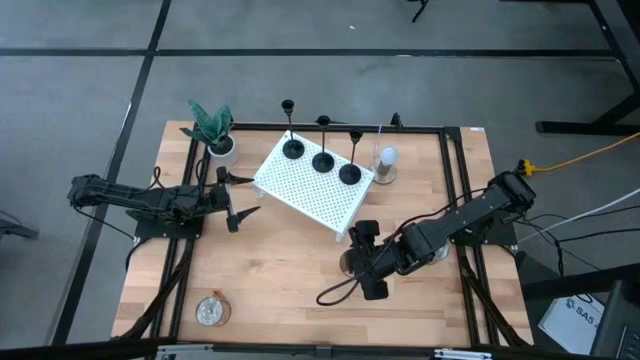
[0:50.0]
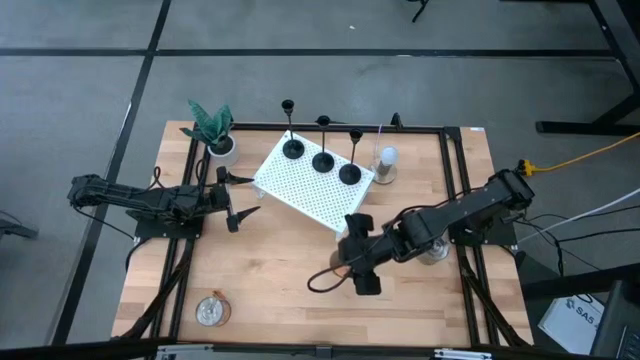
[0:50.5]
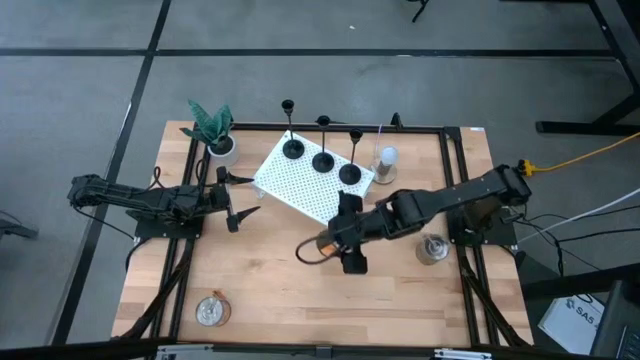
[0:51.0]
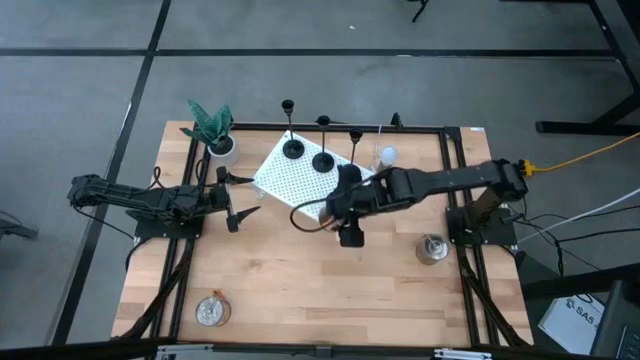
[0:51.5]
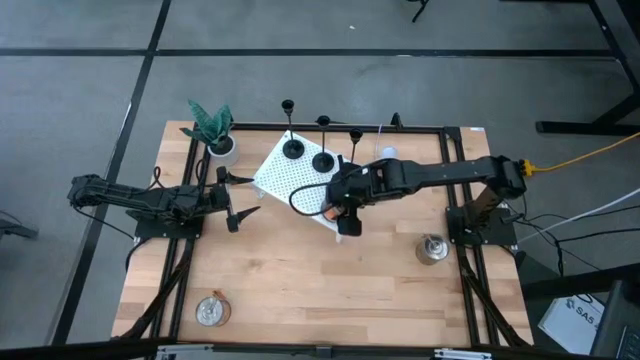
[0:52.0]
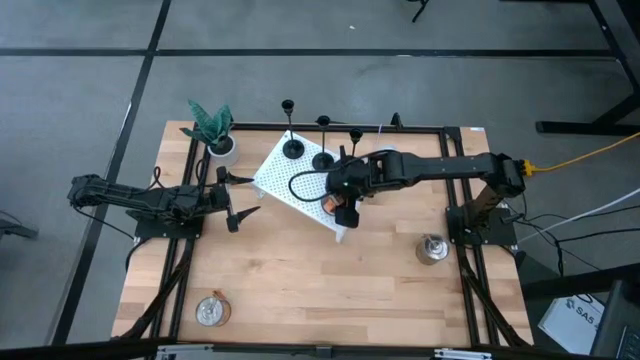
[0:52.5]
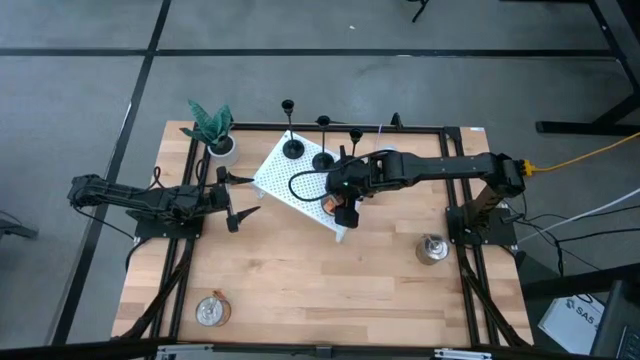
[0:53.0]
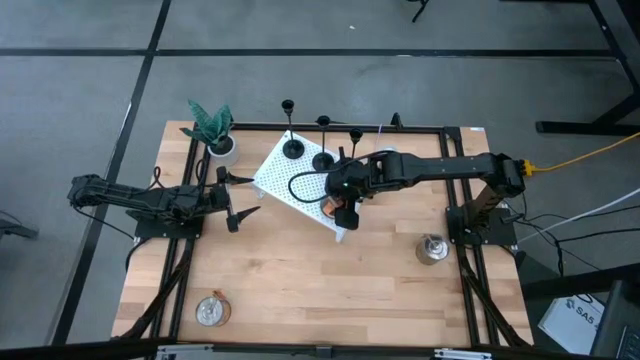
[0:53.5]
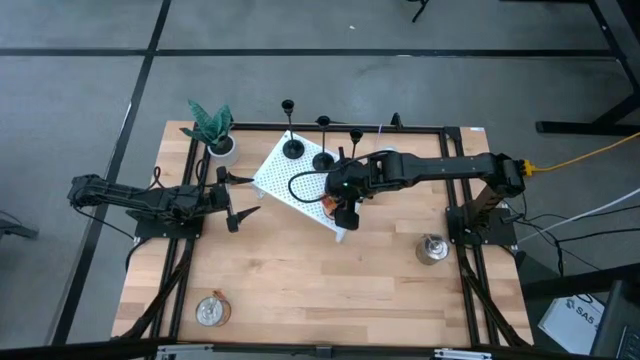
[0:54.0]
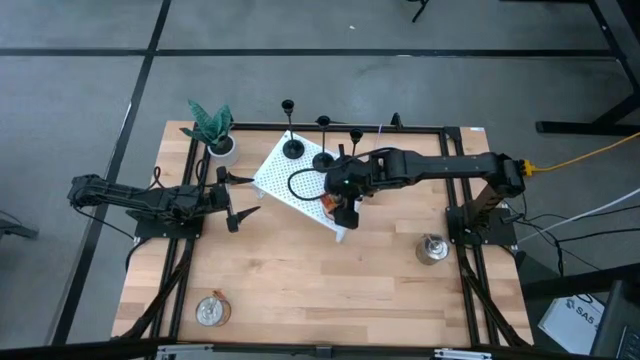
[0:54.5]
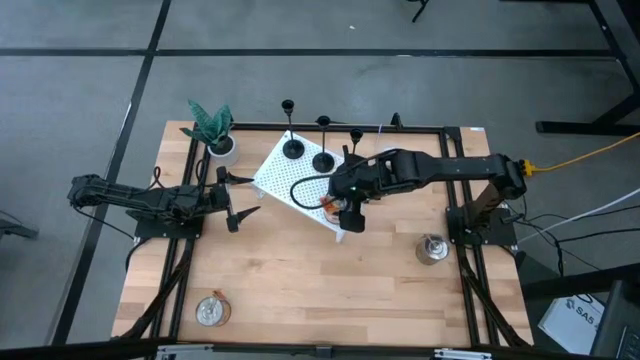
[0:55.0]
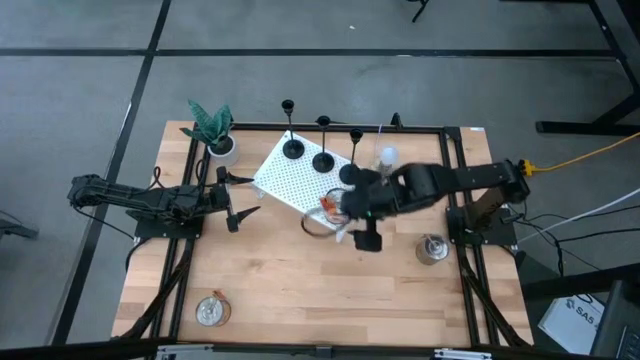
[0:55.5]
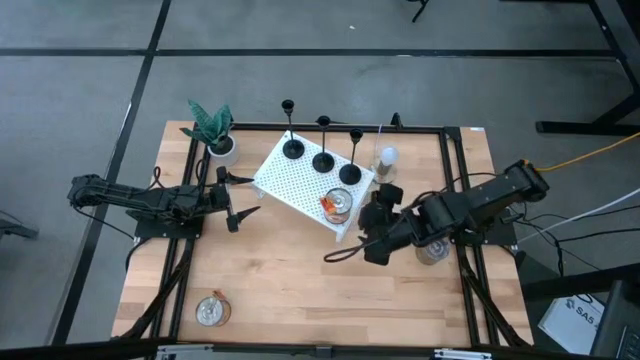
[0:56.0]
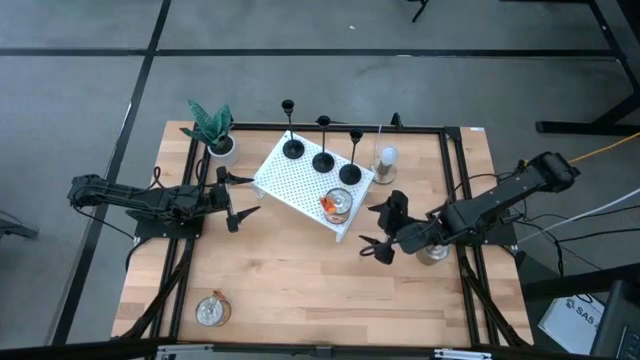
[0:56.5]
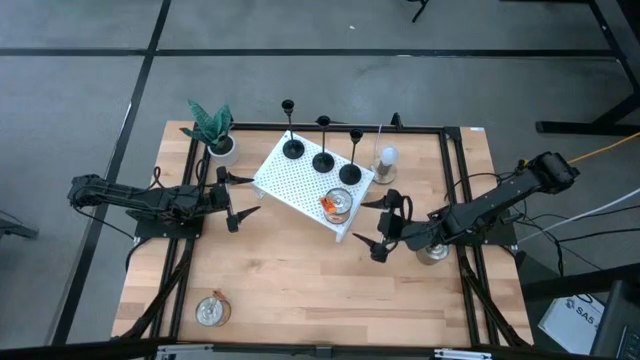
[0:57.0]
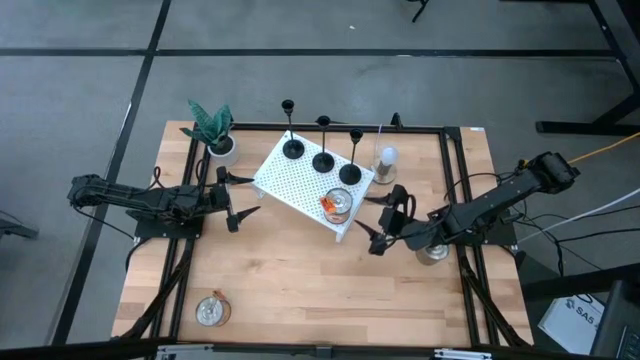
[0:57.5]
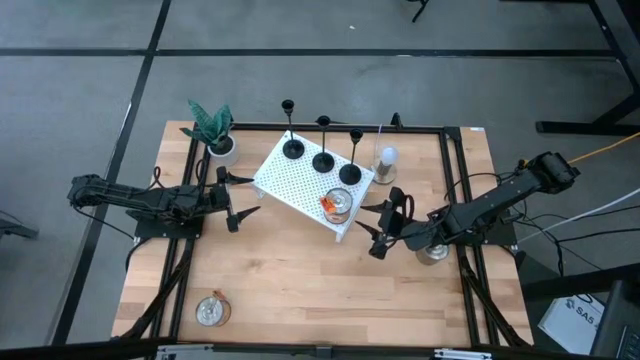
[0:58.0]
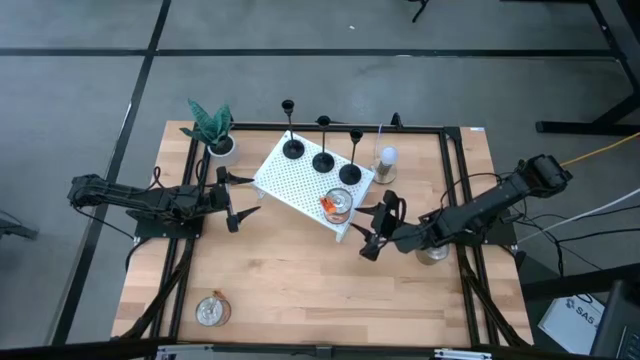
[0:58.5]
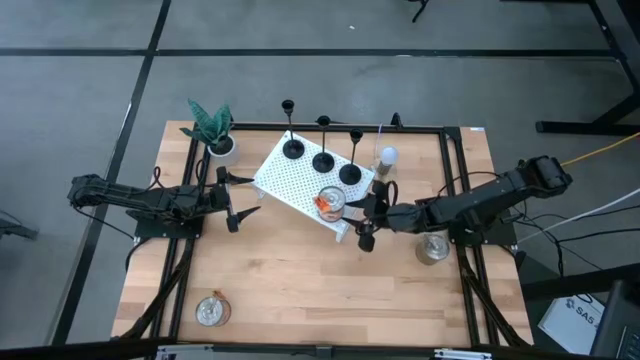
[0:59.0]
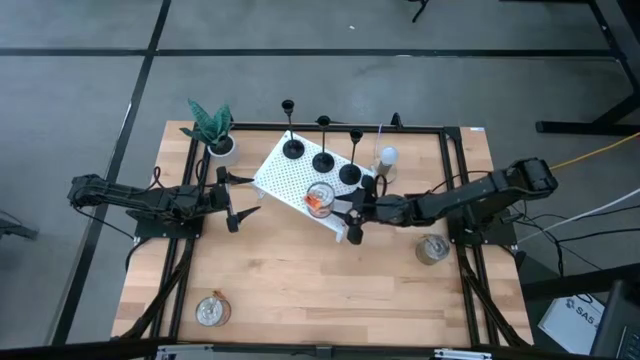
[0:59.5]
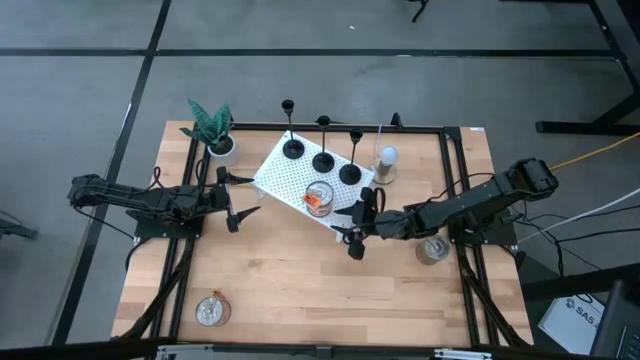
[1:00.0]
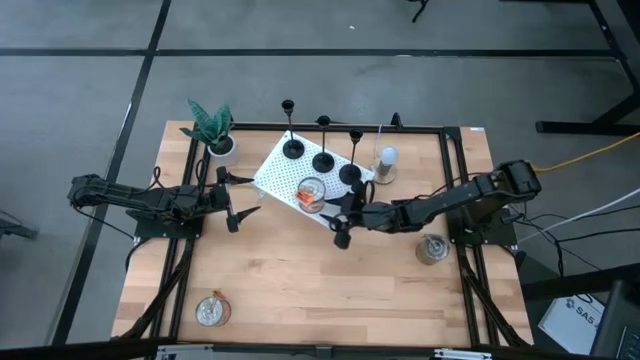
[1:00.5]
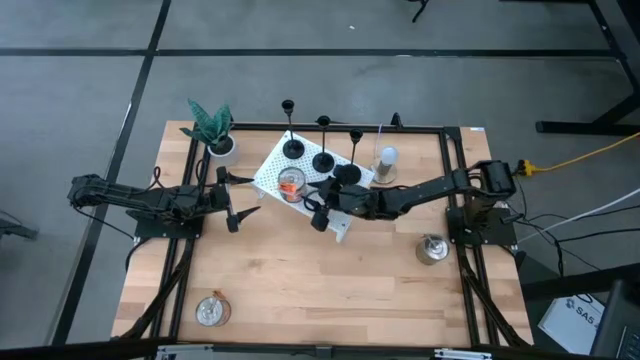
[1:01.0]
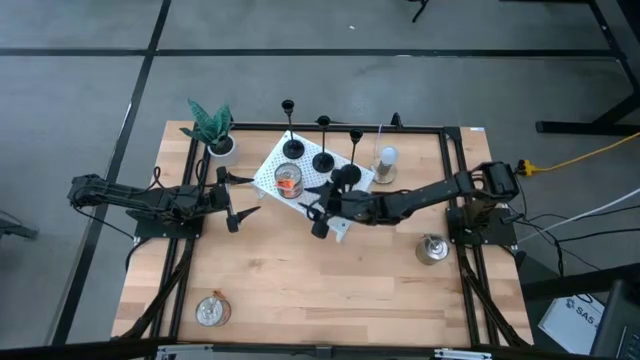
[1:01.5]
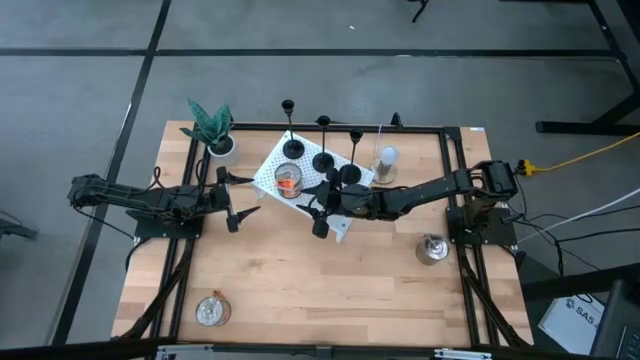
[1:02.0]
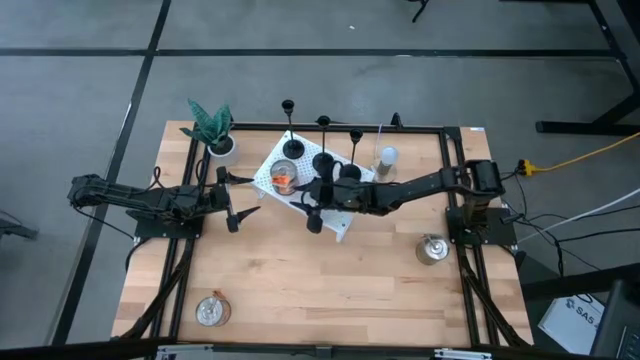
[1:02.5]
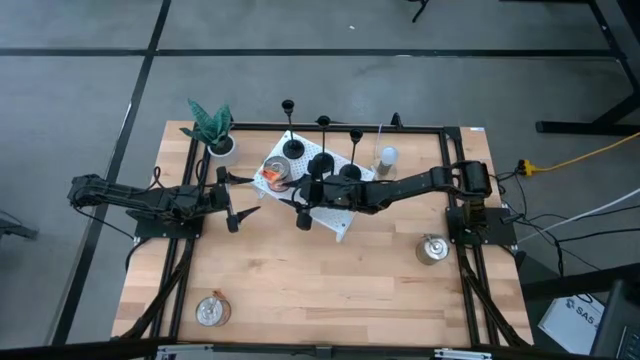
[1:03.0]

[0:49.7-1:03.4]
Task: Pick & Place candle stick holders
Put the top orange scented candle on the shelf

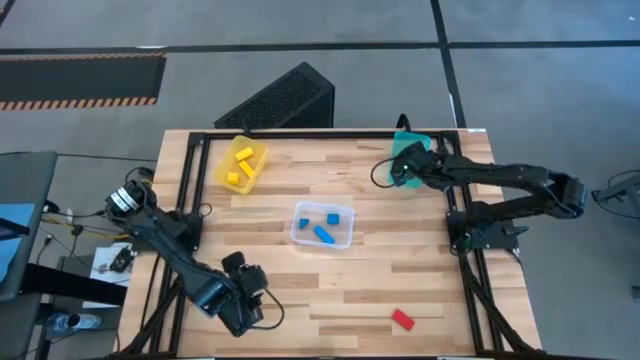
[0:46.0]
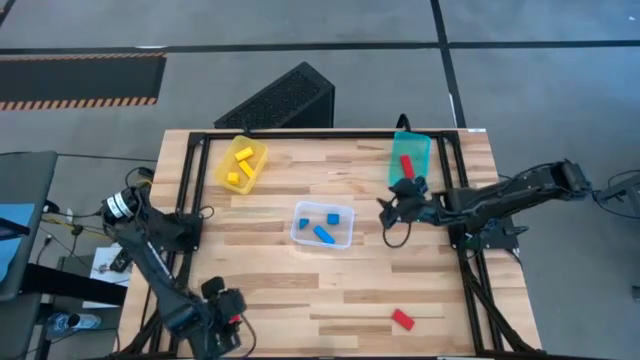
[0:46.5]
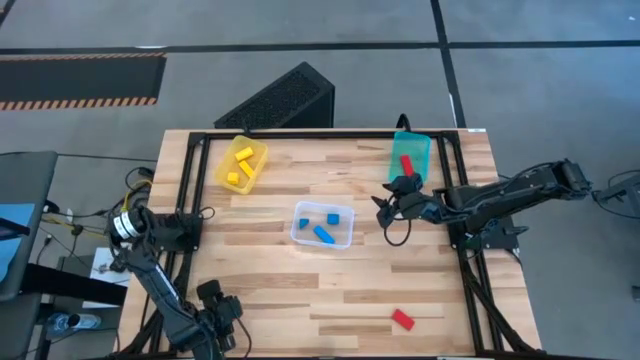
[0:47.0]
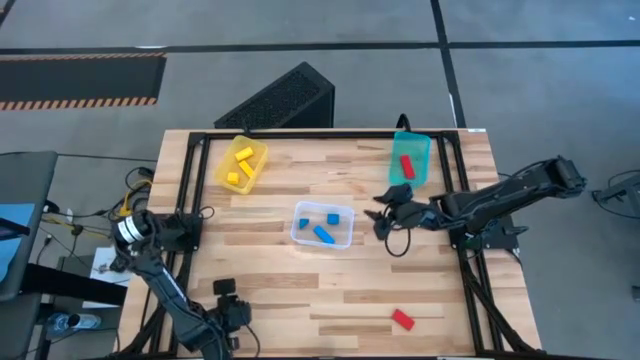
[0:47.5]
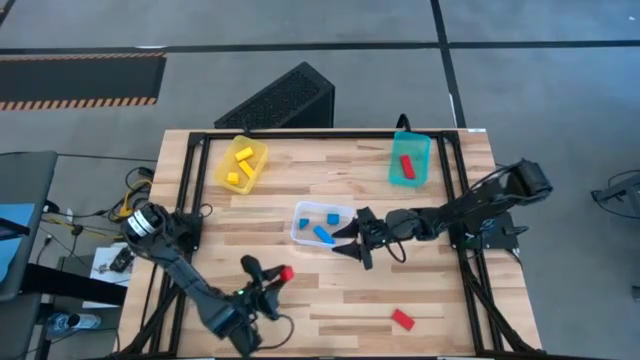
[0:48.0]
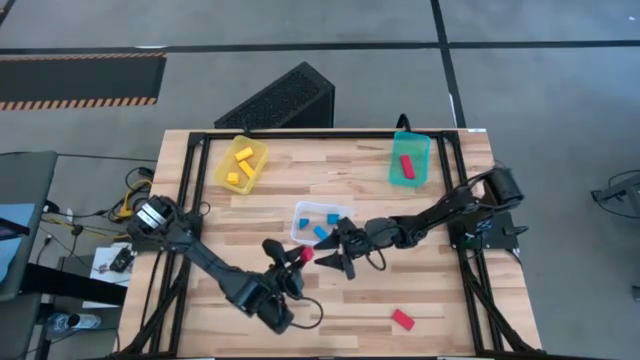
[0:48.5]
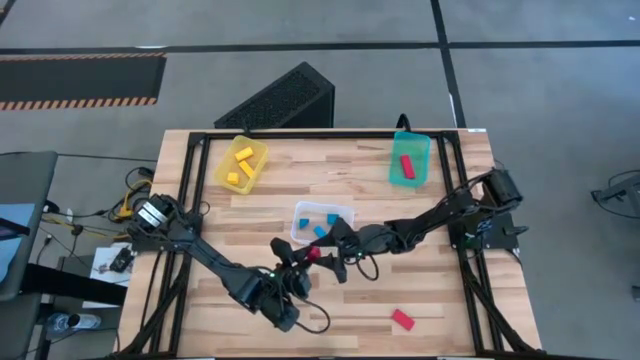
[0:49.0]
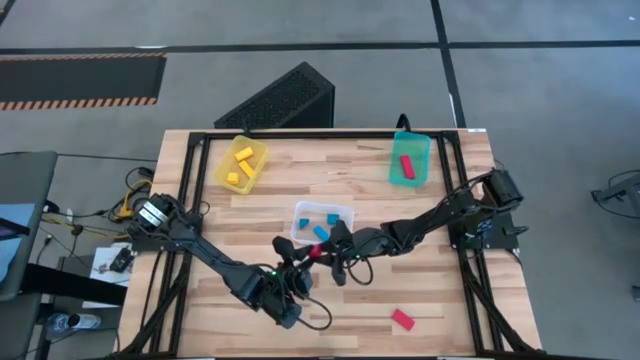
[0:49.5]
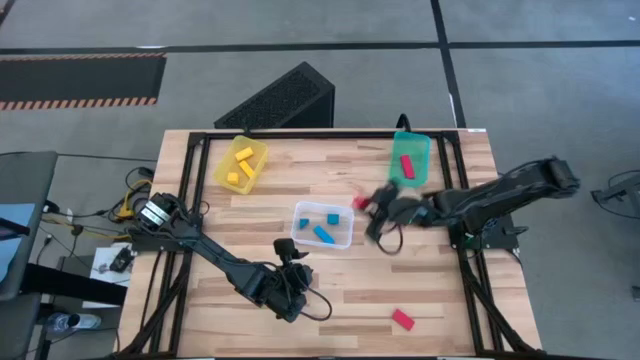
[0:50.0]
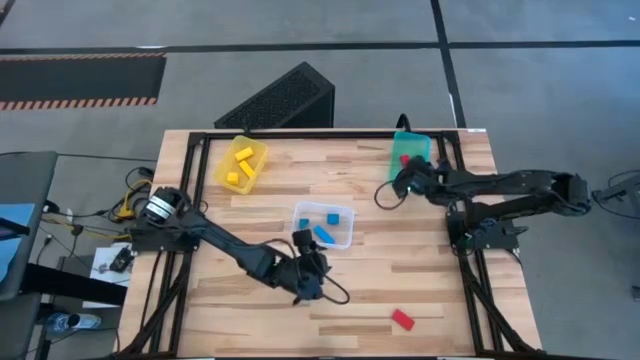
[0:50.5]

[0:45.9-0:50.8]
Task: Sort & place blocks by color
Put the left red block into the green bin

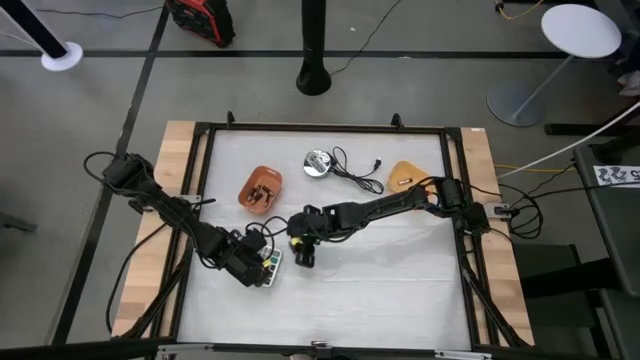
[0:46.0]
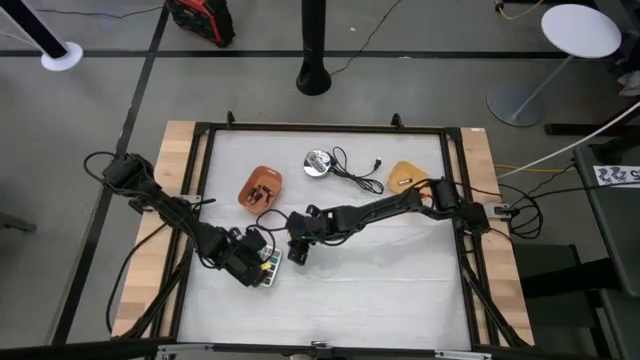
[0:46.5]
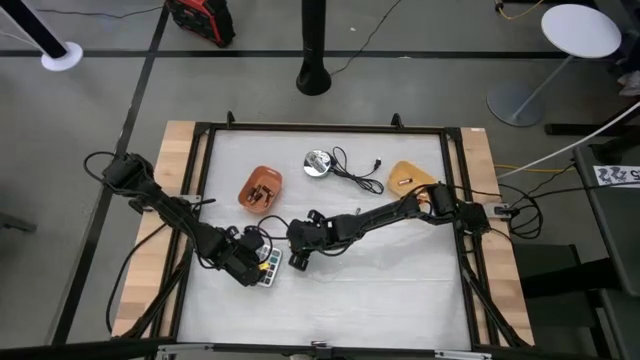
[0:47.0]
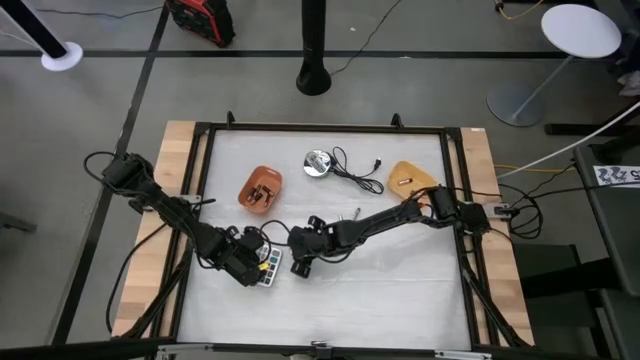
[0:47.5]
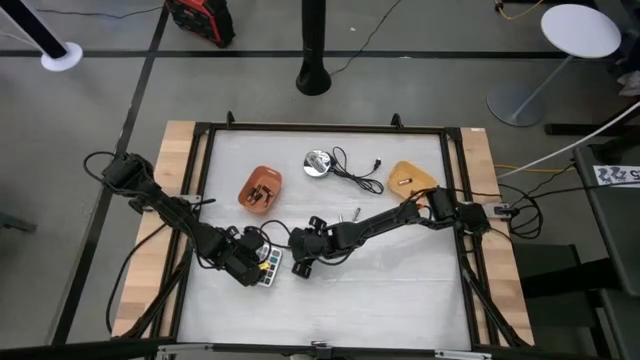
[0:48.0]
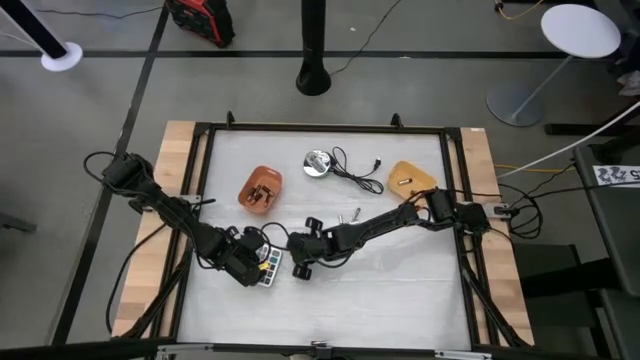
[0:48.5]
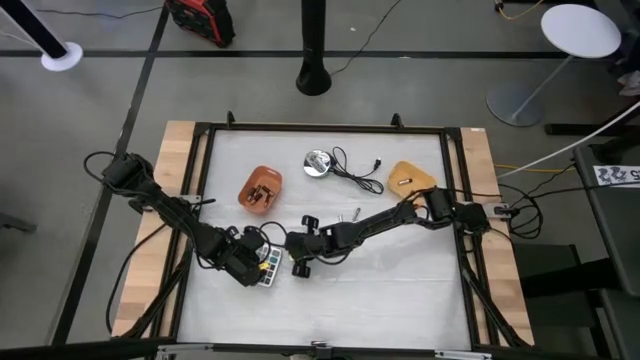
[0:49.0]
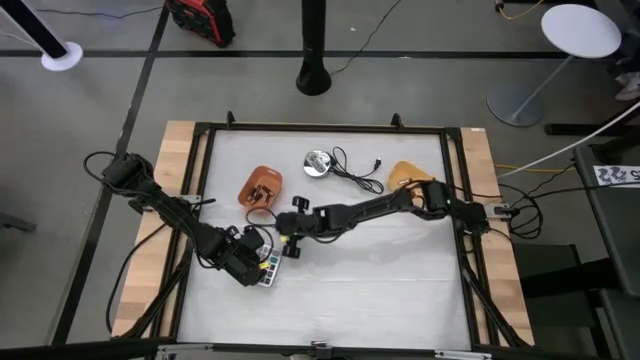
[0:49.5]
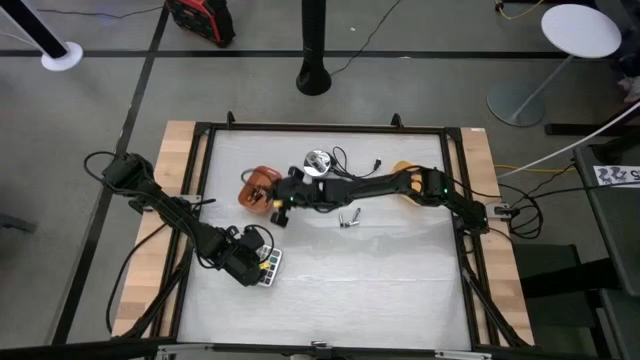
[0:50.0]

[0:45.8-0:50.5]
Task: Sort batteries
Put the black battery into the orange bin
